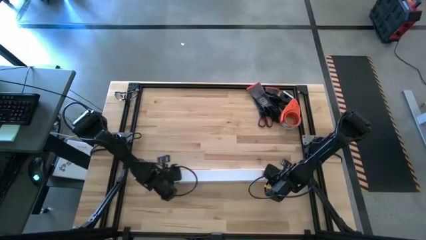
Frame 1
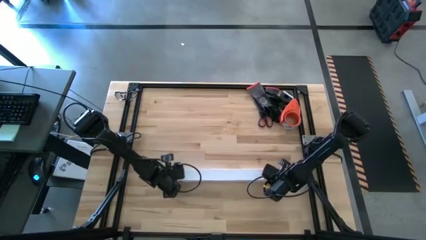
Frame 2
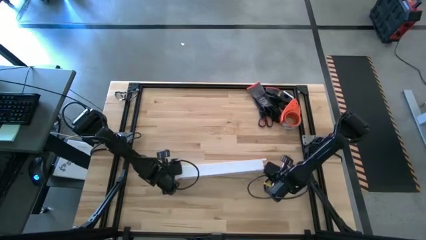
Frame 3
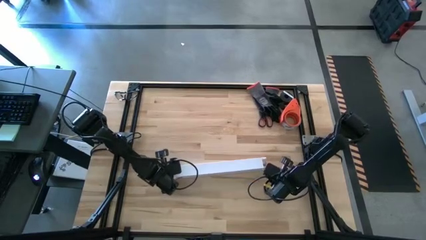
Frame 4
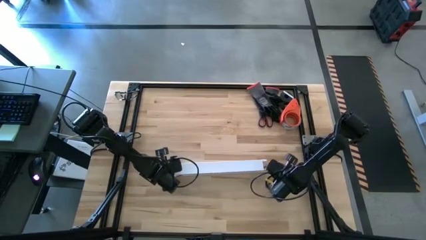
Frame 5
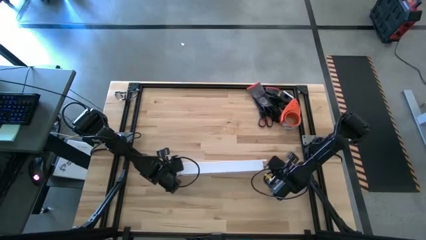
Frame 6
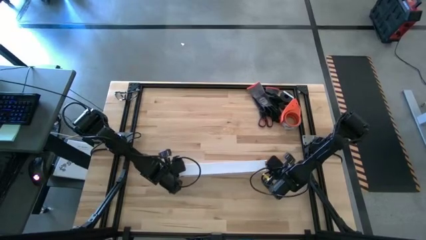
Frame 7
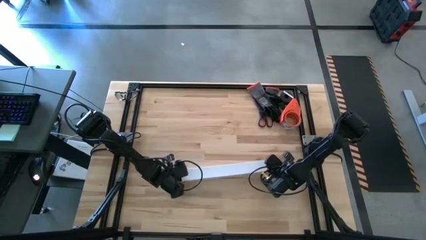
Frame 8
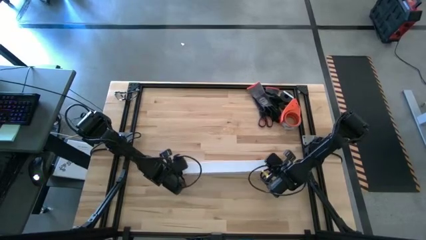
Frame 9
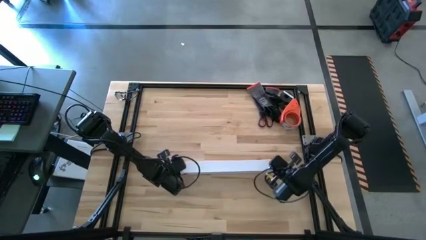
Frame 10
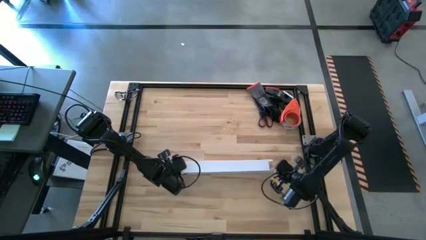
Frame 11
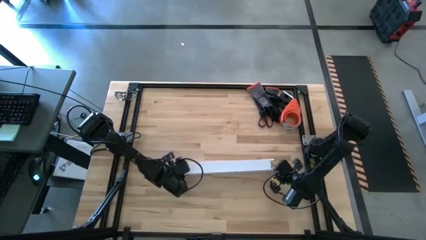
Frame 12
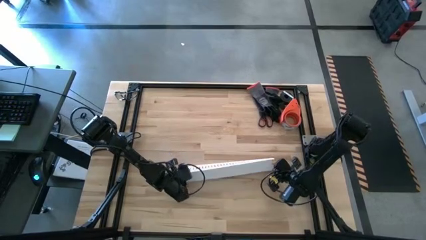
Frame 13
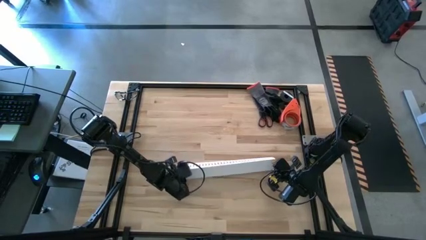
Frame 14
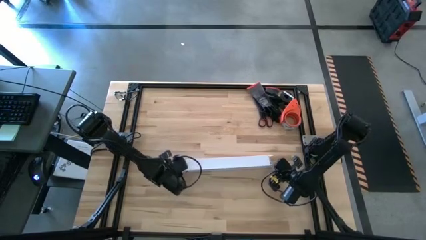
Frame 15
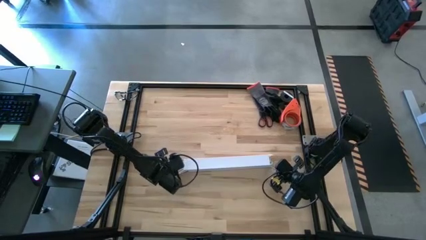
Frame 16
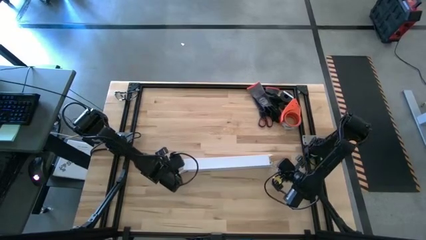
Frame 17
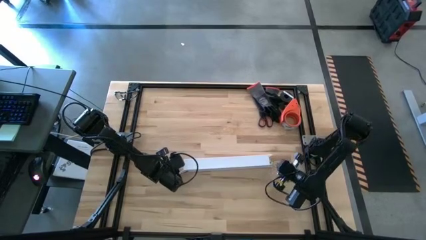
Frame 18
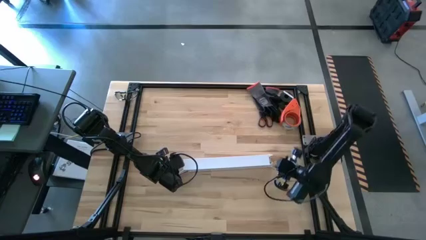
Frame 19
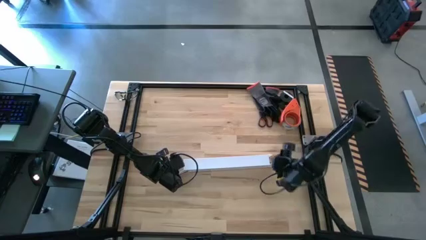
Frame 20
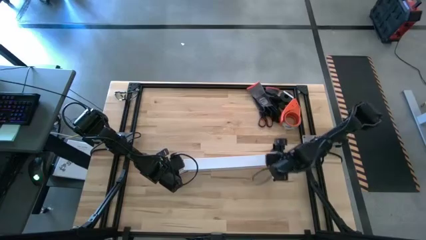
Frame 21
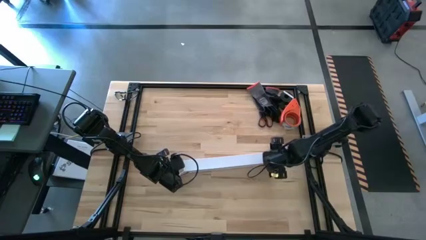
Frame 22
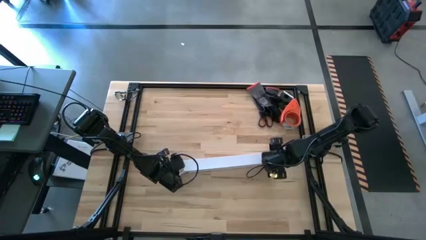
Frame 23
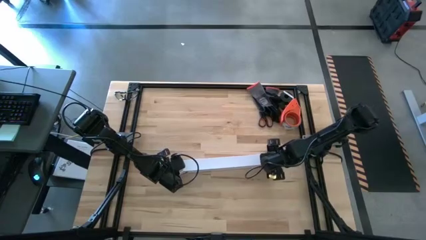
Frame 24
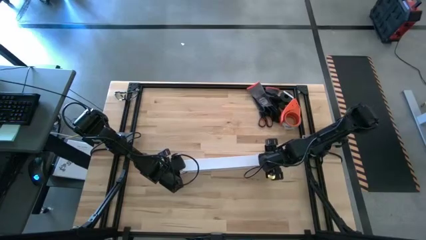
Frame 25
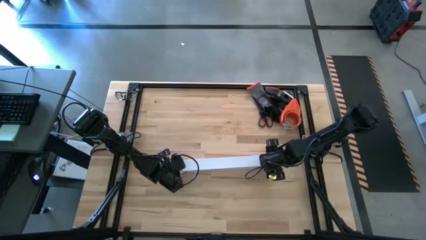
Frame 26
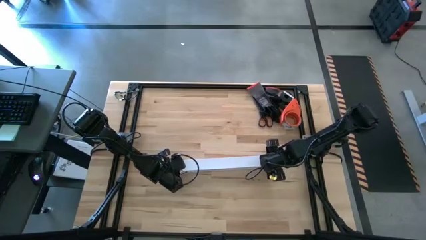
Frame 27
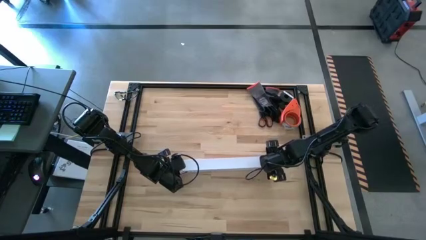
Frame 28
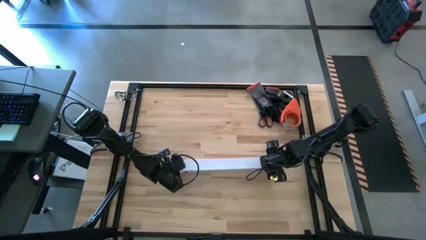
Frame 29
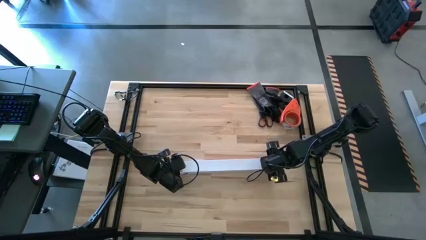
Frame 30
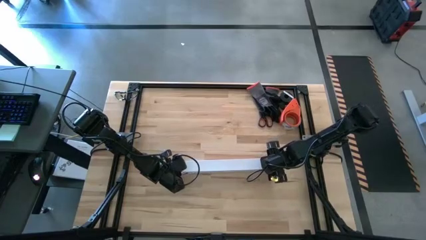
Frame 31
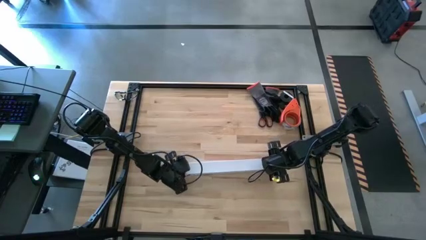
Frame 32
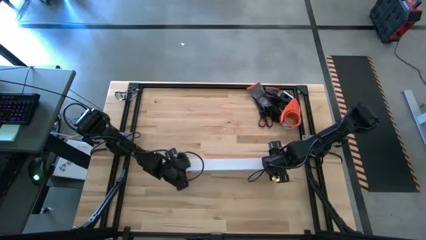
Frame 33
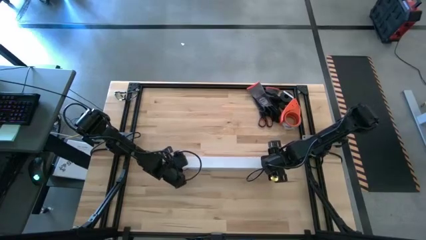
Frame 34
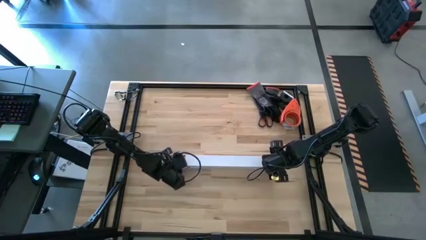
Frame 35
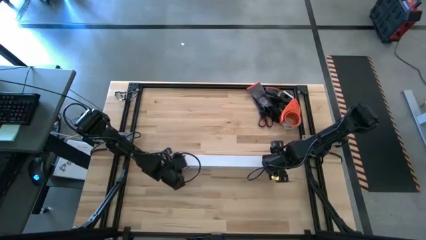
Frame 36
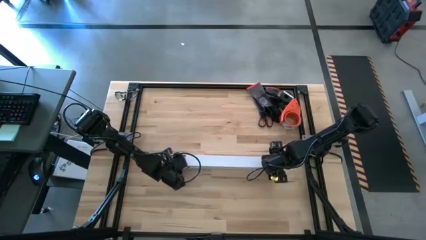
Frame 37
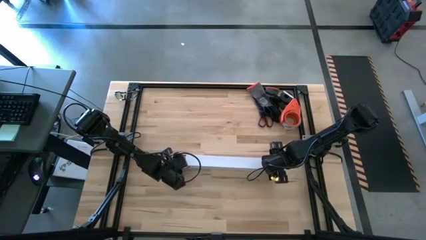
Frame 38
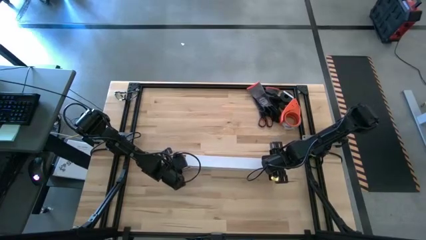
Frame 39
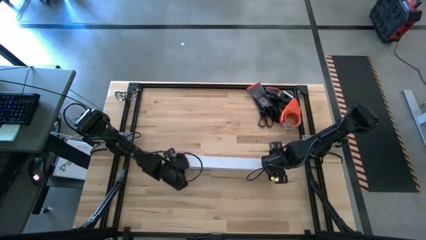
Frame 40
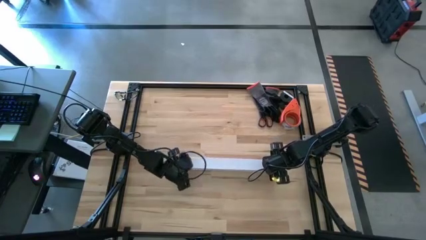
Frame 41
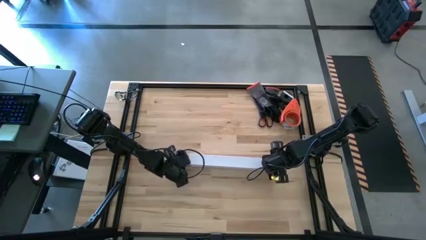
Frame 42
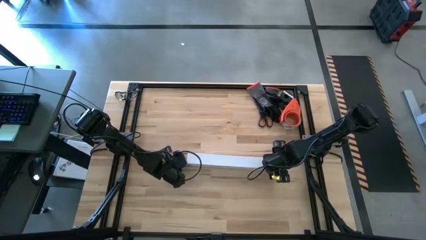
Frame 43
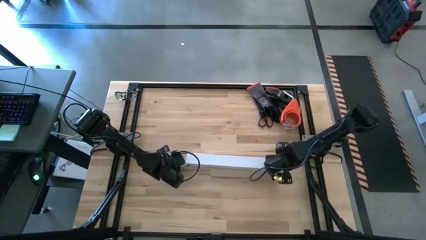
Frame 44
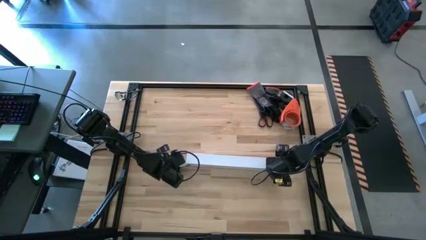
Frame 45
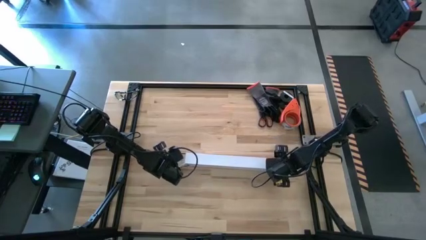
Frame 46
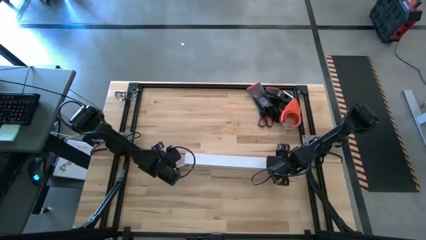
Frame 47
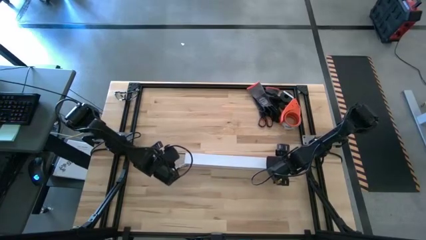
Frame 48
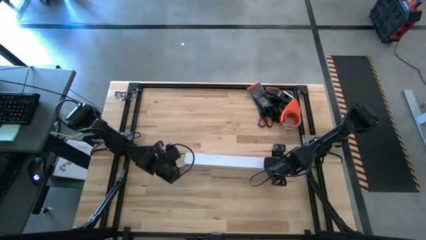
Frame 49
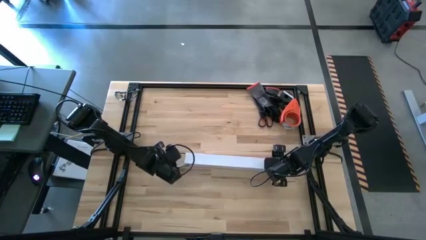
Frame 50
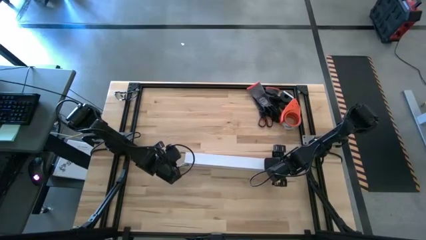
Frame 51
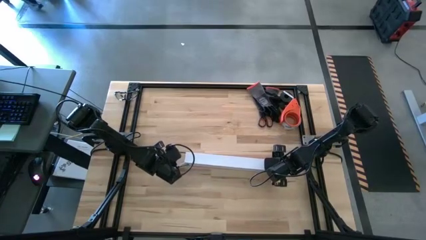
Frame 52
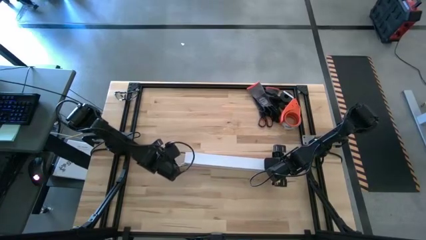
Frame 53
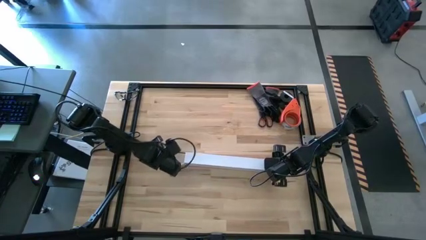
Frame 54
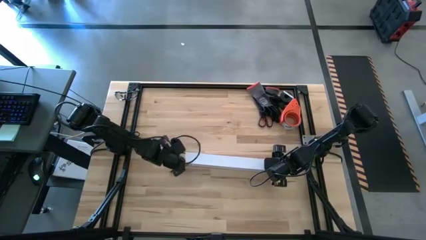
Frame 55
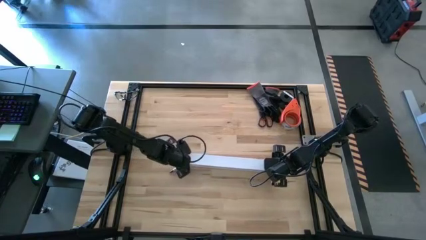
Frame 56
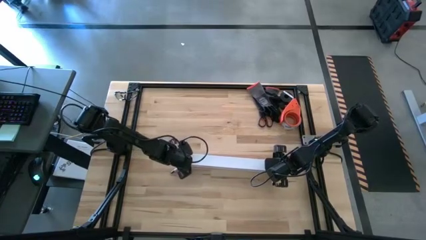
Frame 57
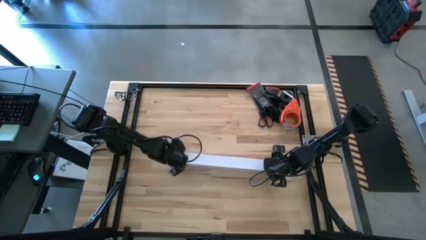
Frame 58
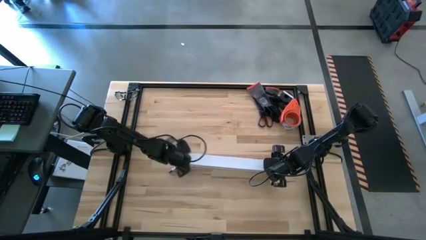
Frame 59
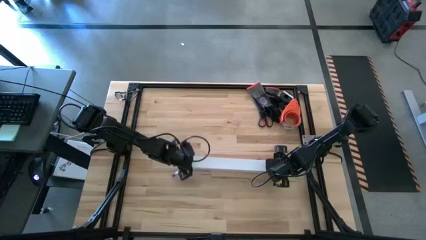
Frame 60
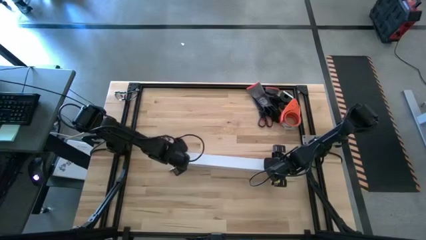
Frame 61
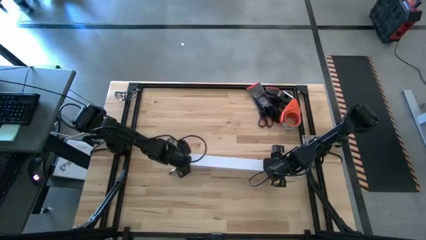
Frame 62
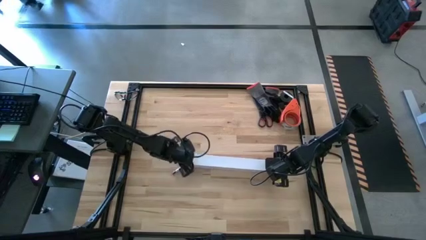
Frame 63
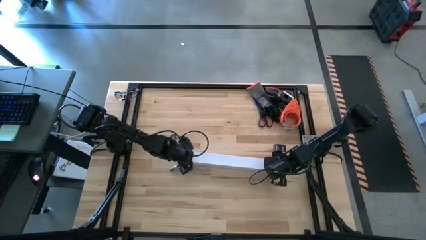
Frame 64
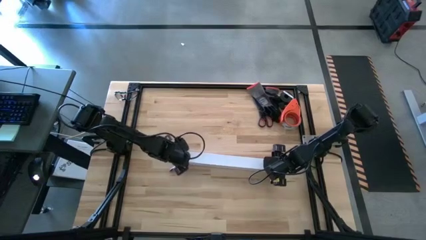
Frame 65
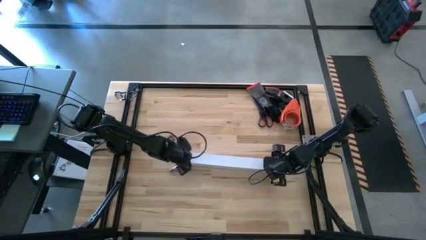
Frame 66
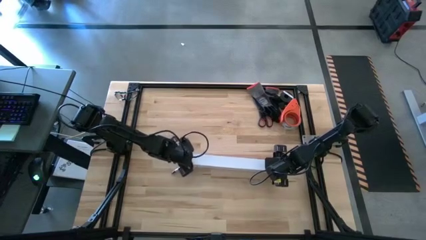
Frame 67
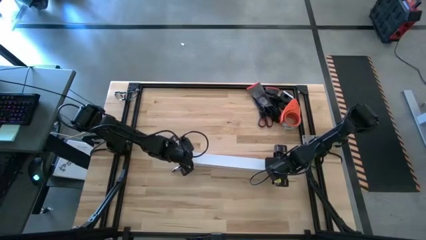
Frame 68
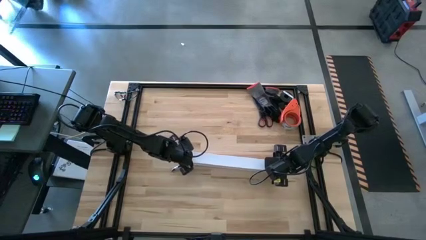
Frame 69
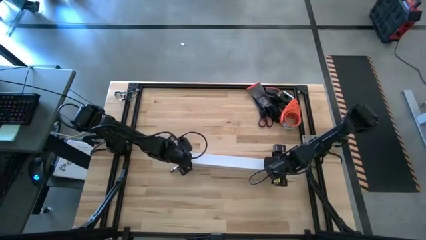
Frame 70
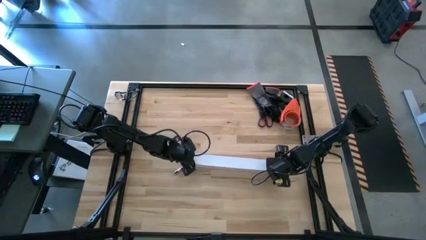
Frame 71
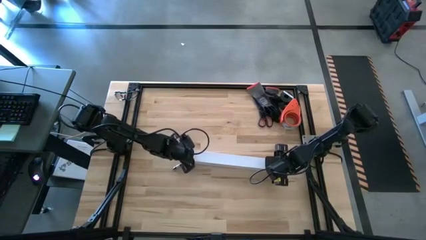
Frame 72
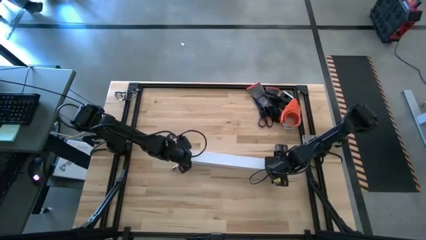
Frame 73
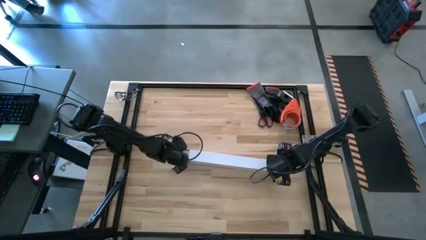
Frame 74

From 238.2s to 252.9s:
Task: Ziptie cables
Close the white cable duct
